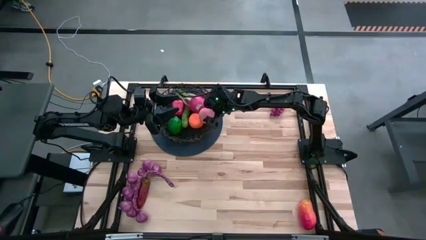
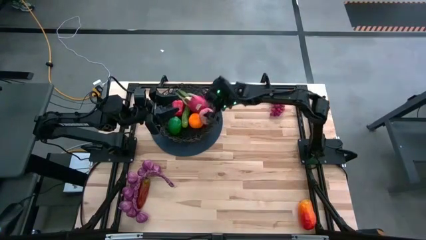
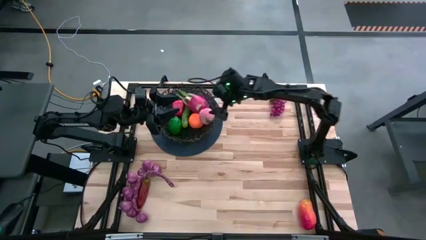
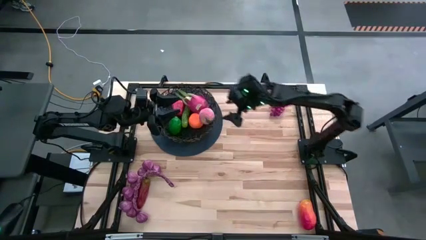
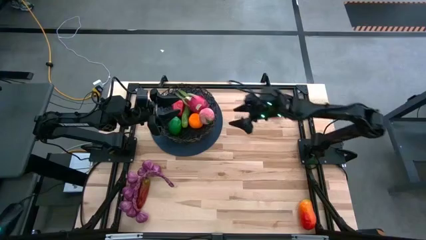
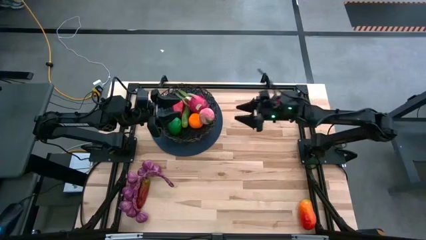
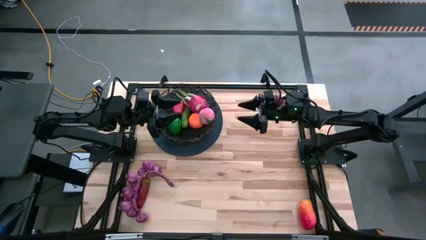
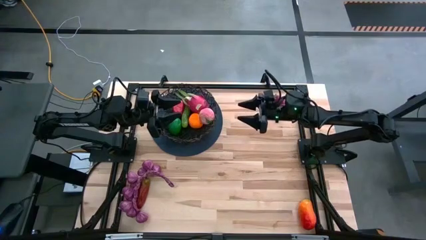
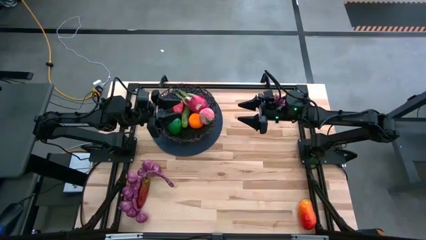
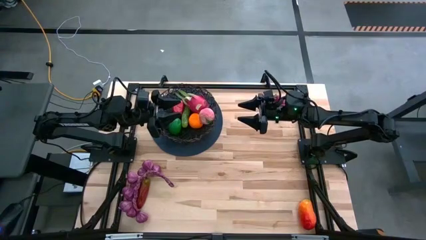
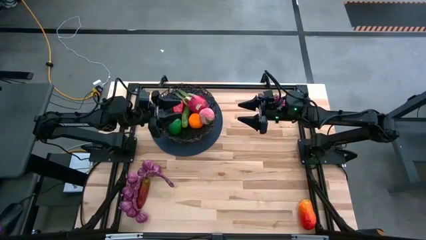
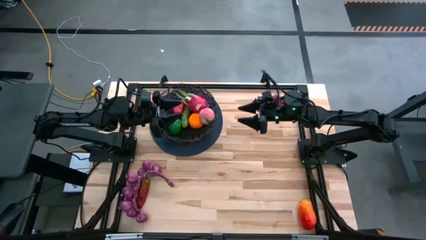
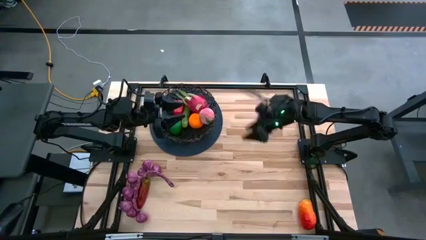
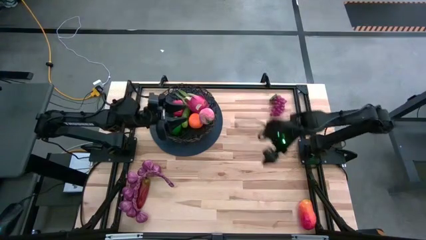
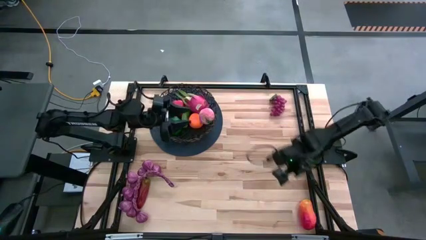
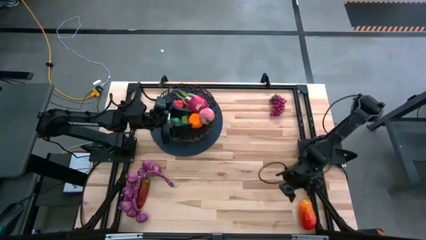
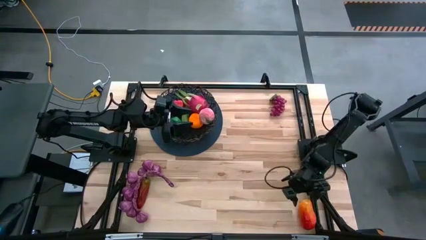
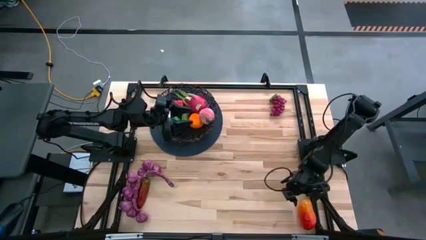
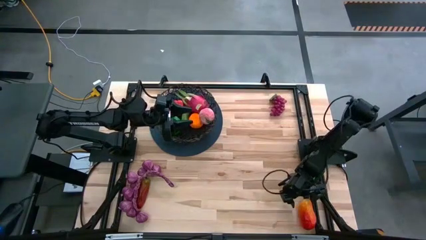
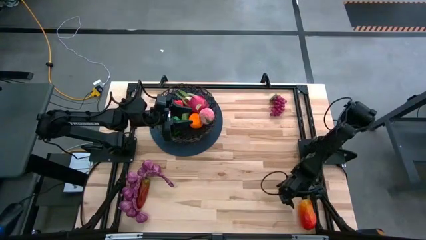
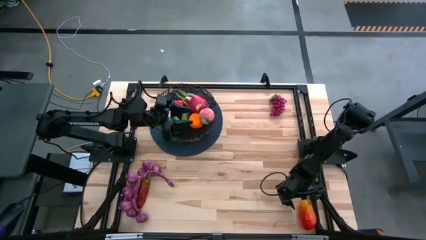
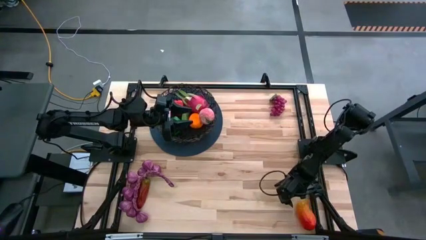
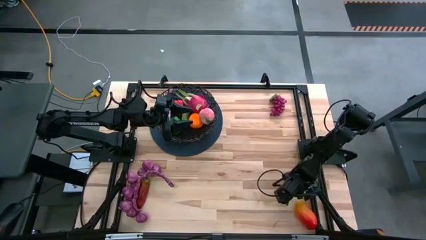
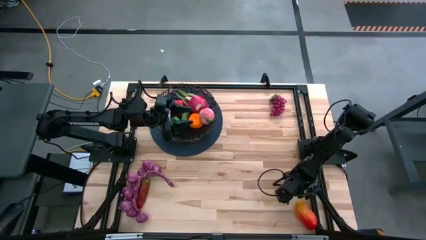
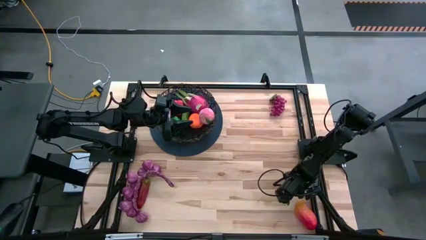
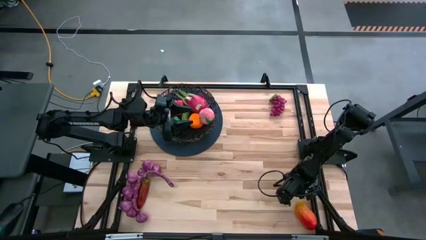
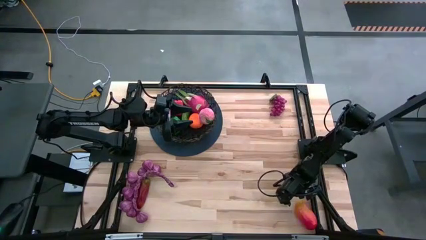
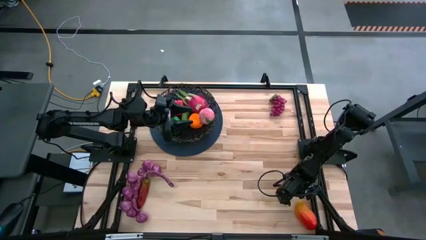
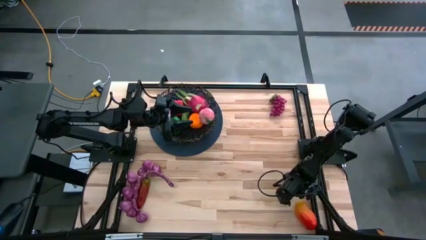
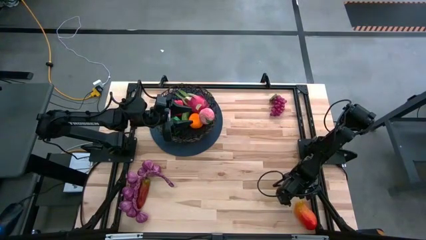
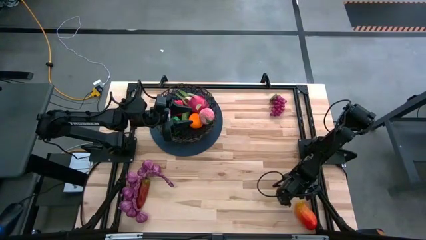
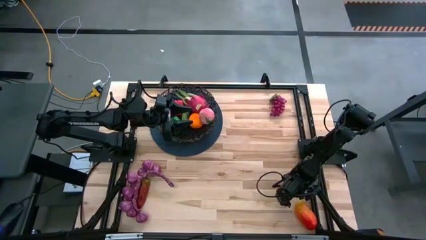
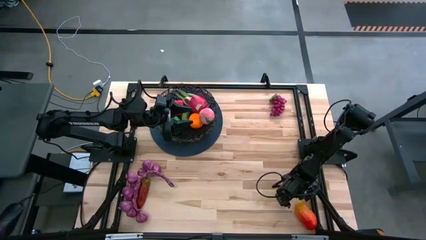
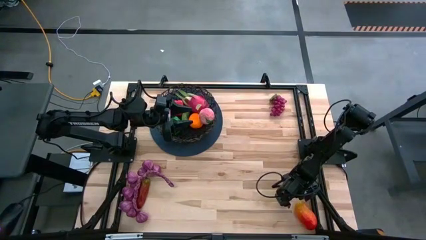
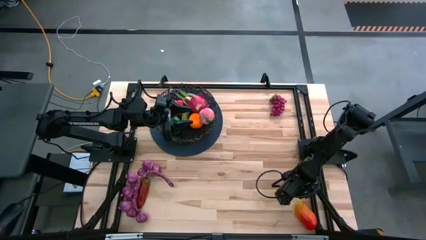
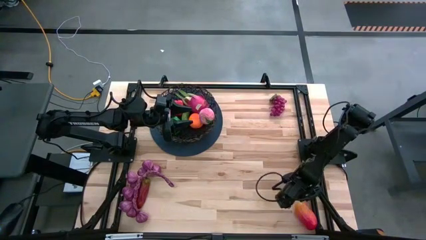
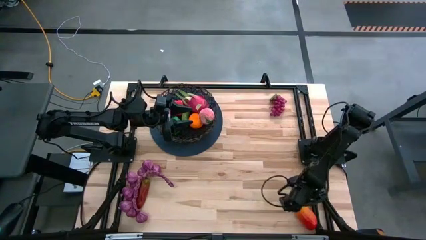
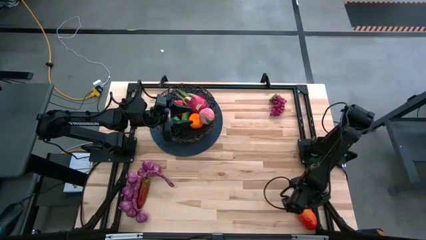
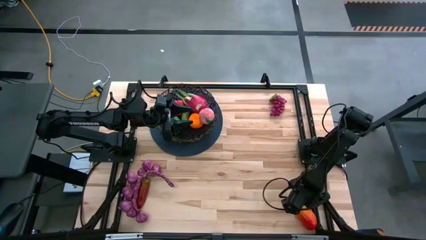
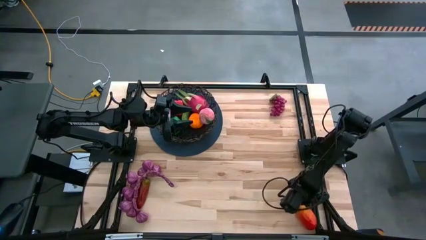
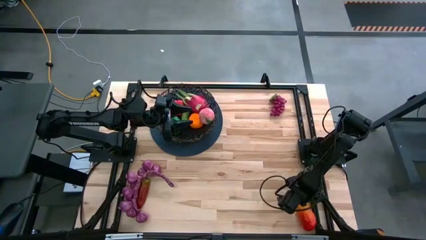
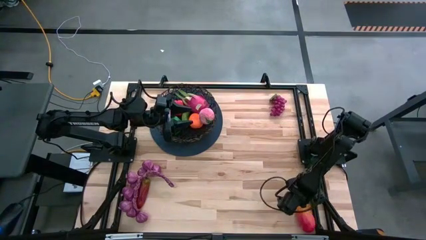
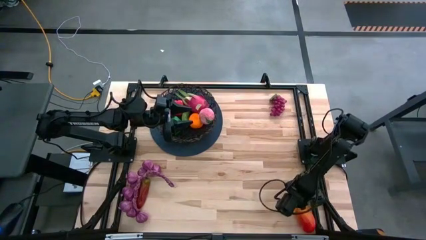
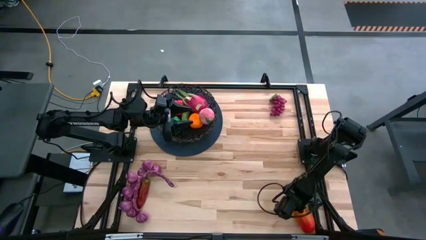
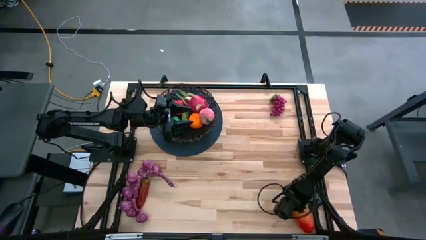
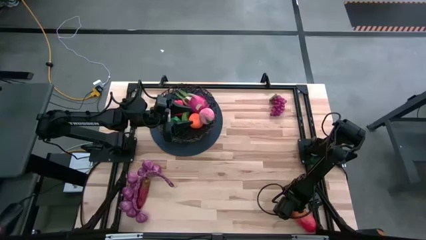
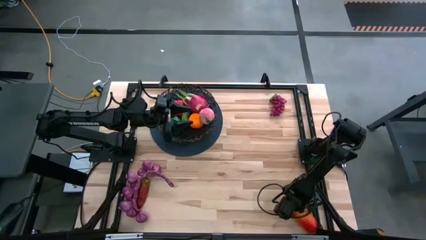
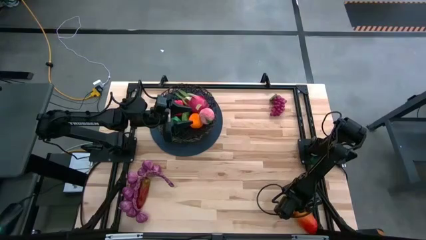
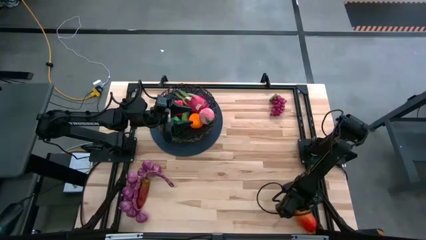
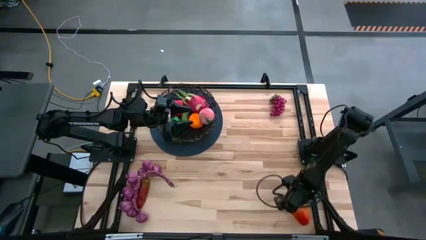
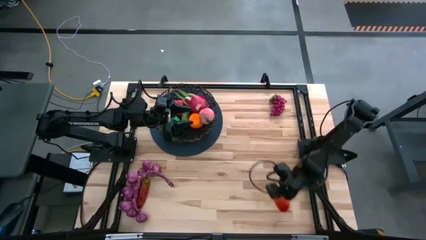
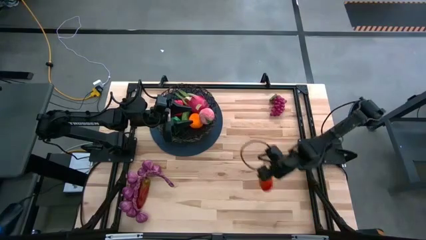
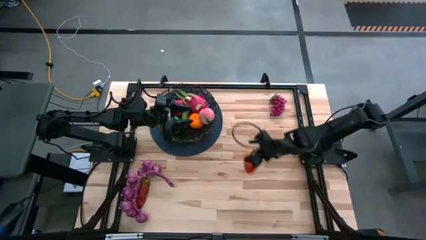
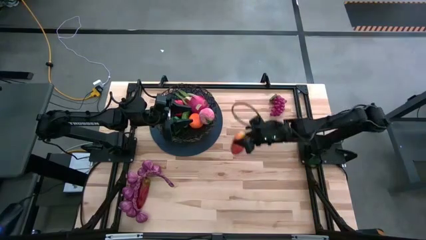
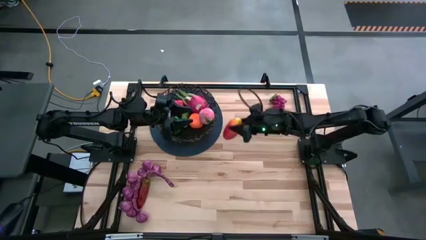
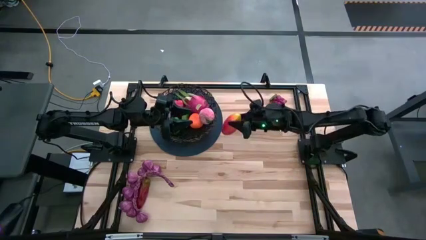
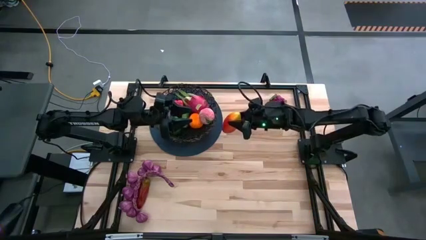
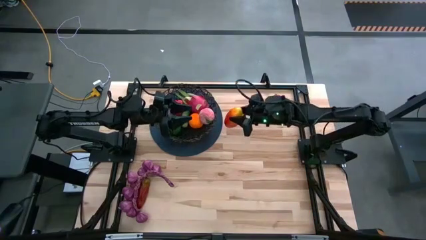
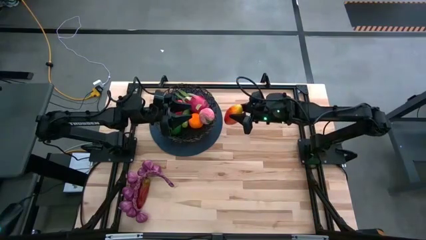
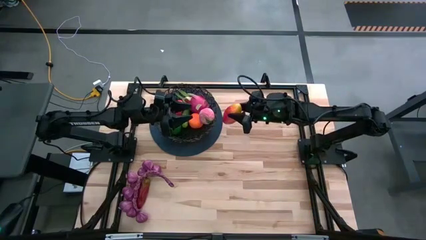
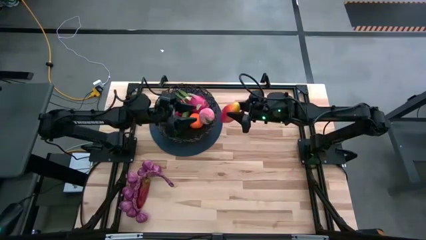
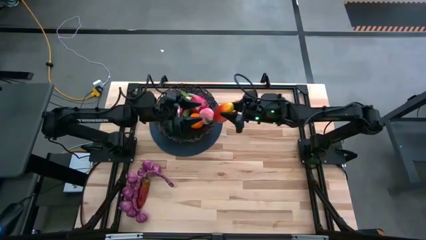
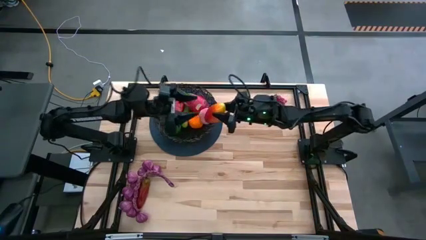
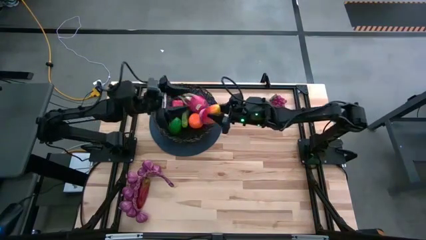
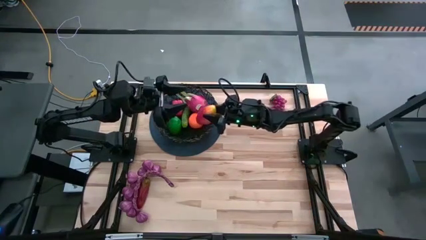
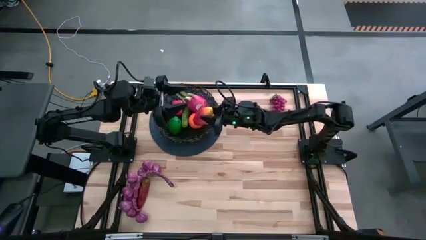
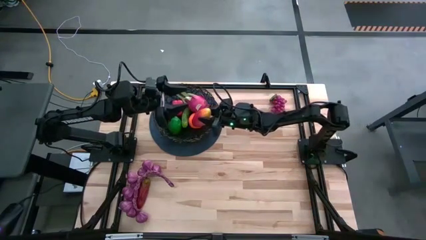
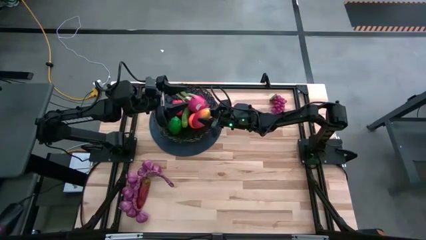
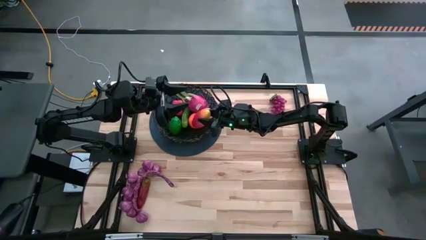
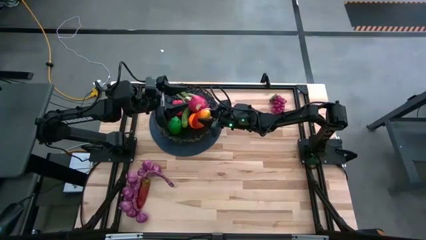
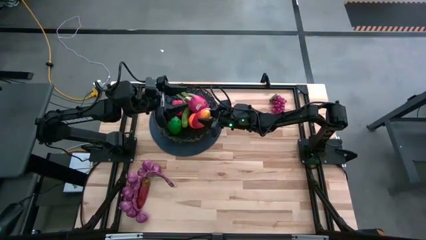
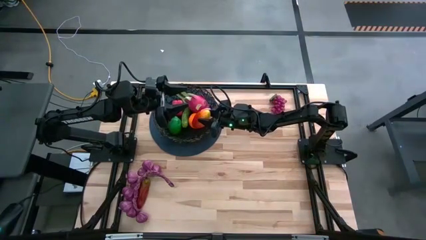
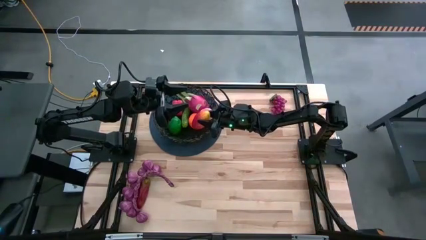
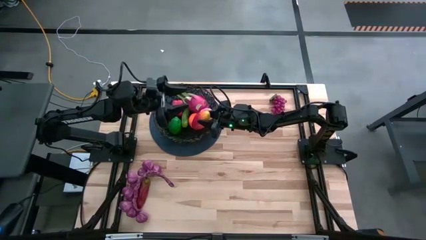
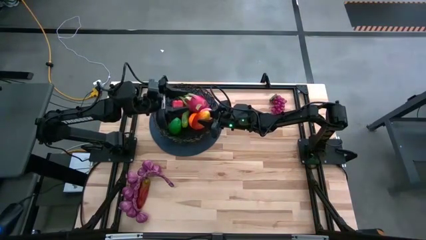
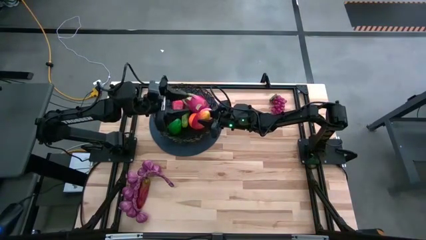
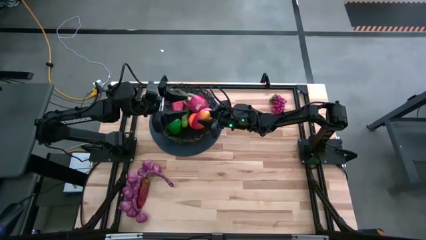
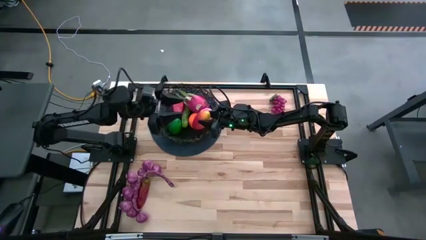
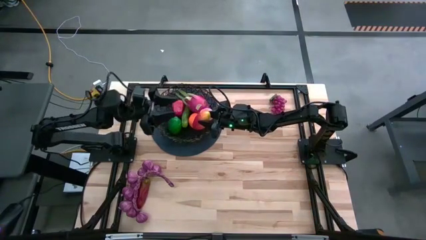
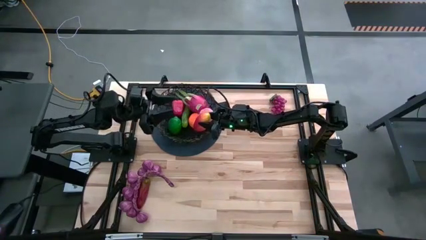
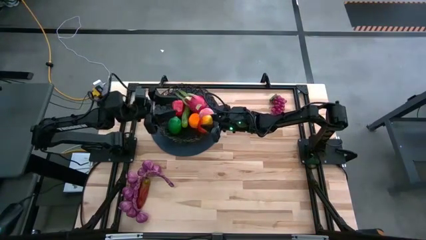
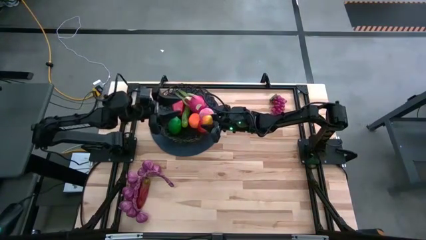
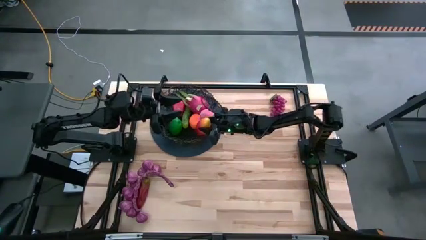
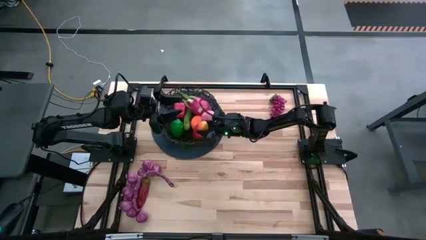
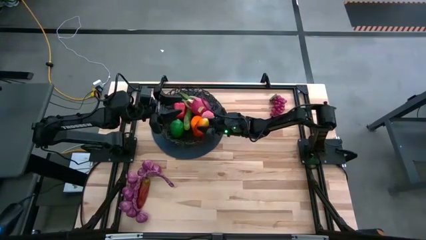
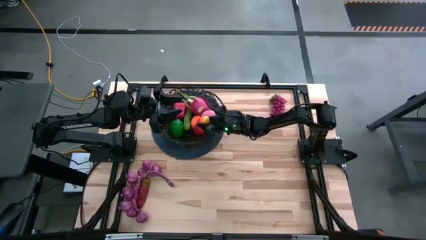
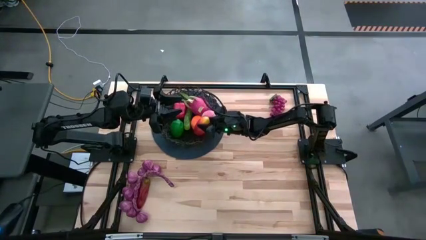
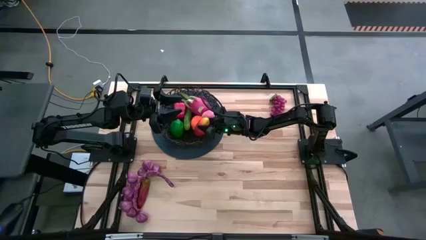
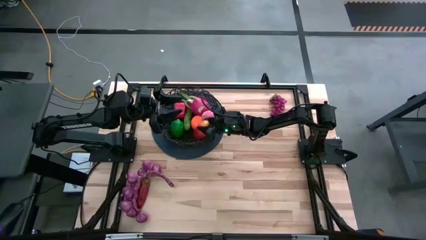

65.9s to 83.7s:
Task: Build produce basket
Put the orange mango into the black wire basket
